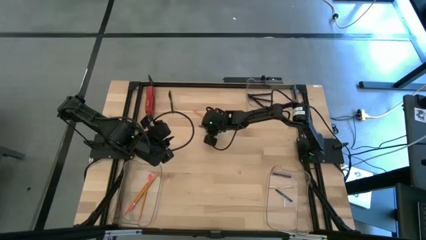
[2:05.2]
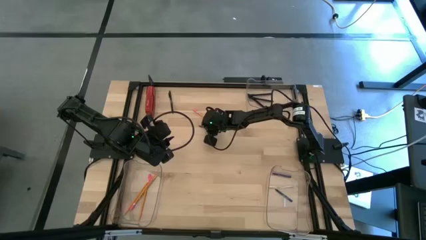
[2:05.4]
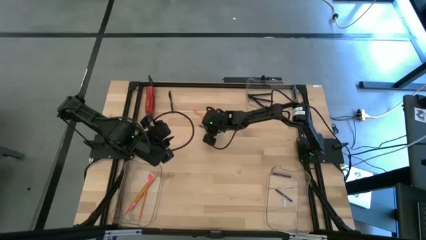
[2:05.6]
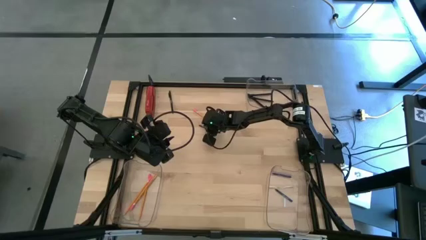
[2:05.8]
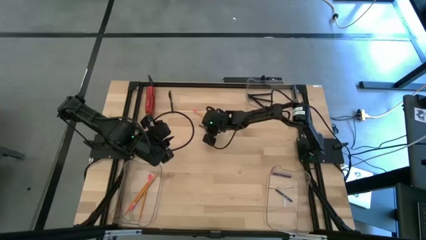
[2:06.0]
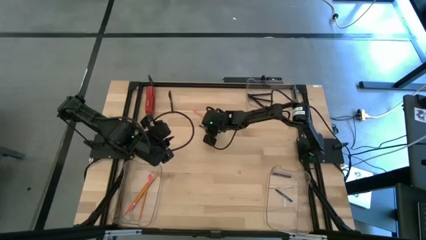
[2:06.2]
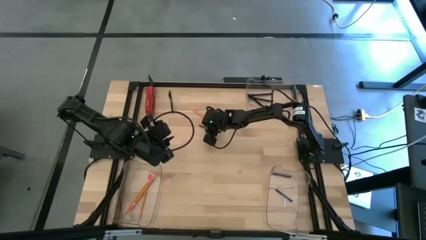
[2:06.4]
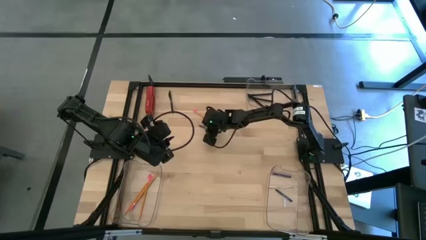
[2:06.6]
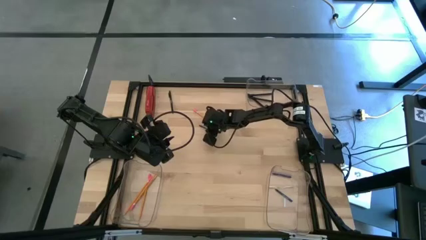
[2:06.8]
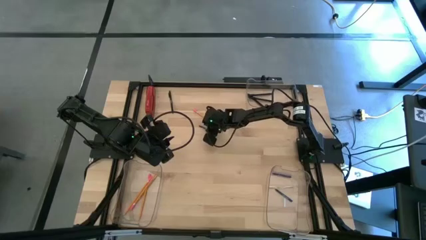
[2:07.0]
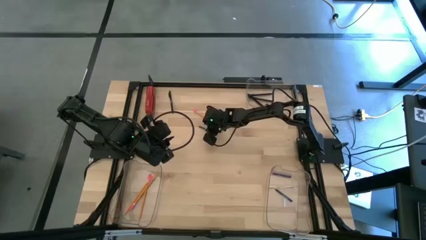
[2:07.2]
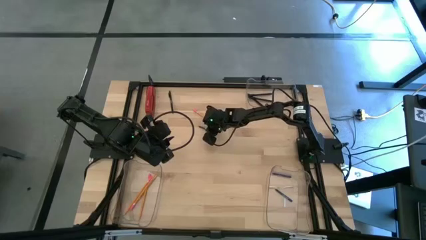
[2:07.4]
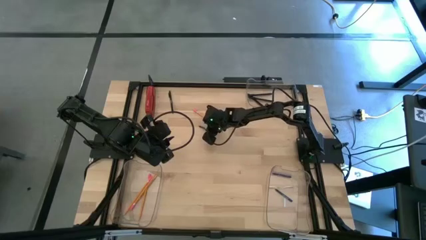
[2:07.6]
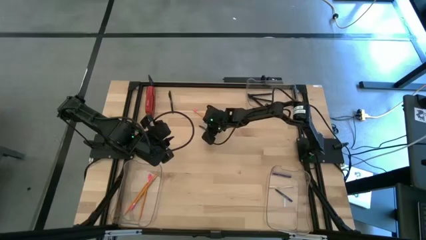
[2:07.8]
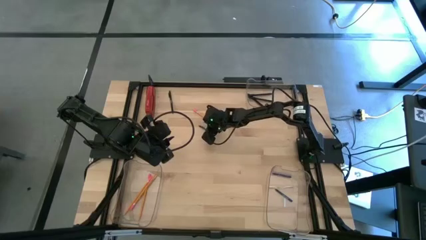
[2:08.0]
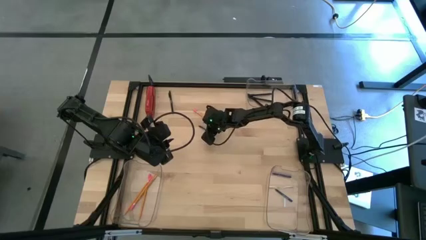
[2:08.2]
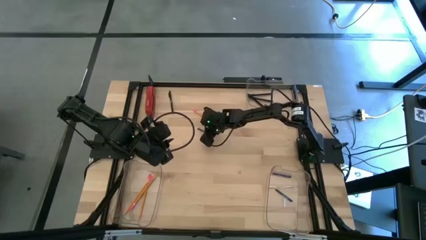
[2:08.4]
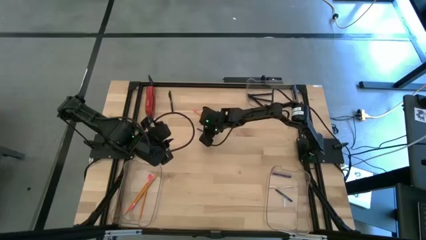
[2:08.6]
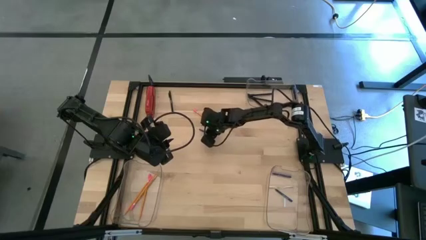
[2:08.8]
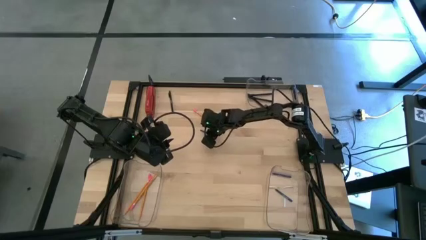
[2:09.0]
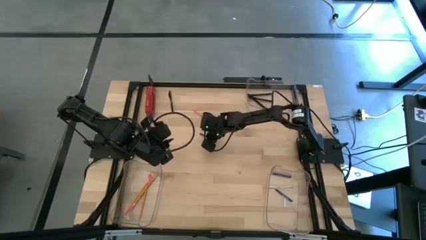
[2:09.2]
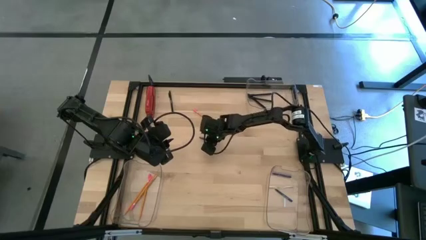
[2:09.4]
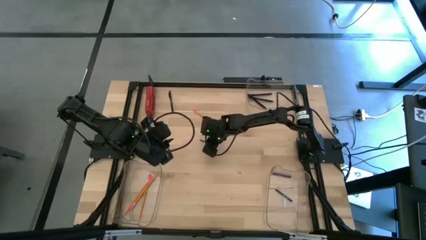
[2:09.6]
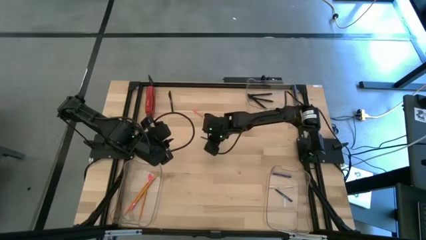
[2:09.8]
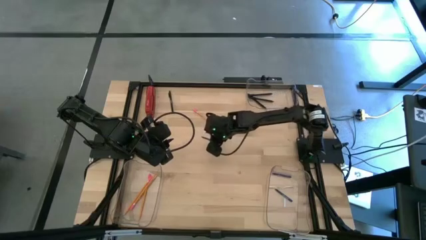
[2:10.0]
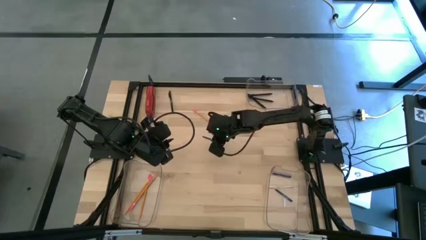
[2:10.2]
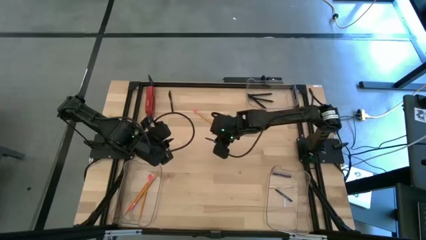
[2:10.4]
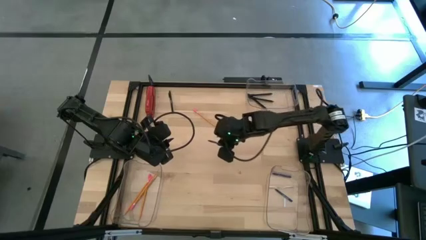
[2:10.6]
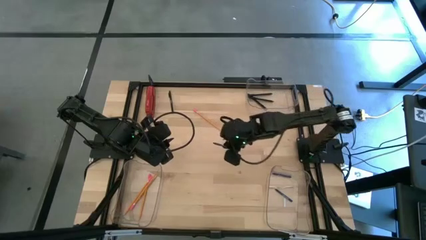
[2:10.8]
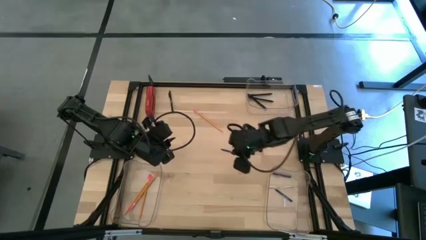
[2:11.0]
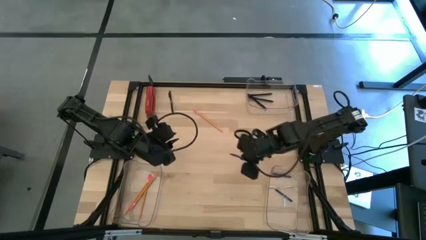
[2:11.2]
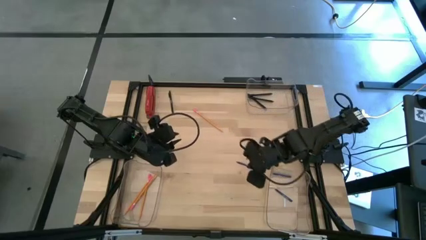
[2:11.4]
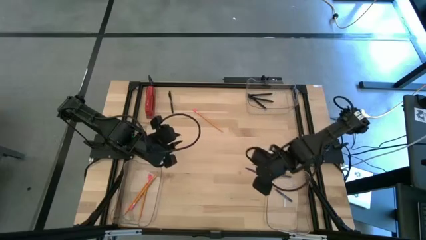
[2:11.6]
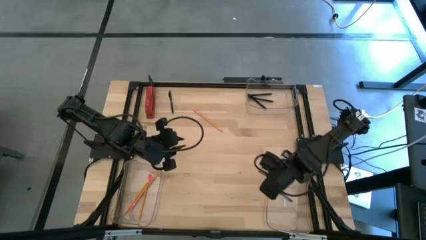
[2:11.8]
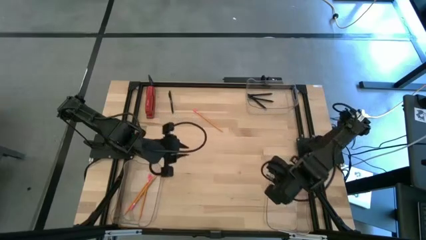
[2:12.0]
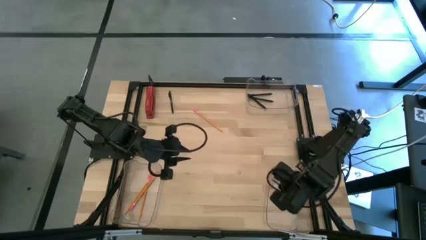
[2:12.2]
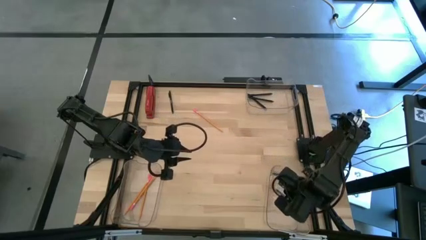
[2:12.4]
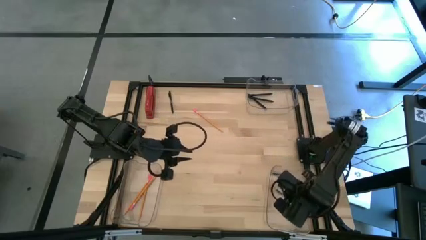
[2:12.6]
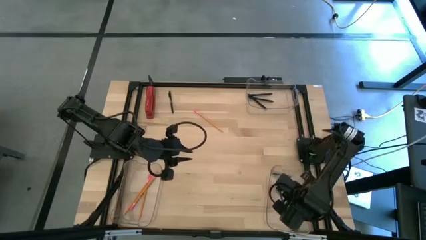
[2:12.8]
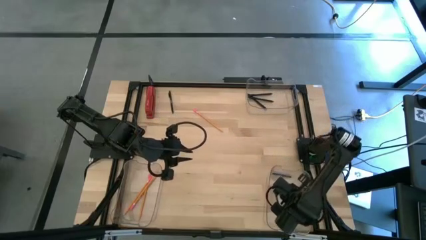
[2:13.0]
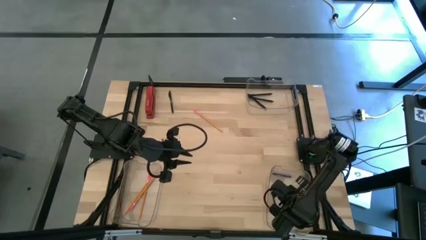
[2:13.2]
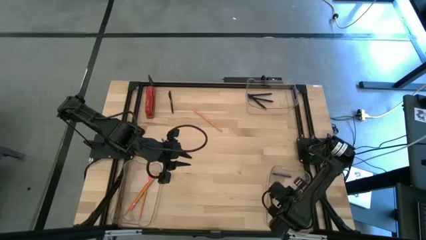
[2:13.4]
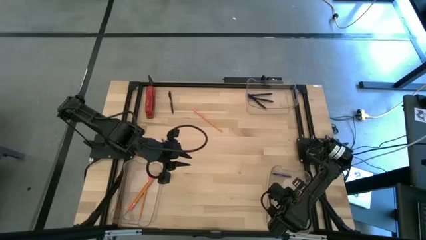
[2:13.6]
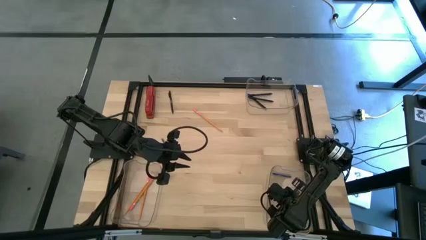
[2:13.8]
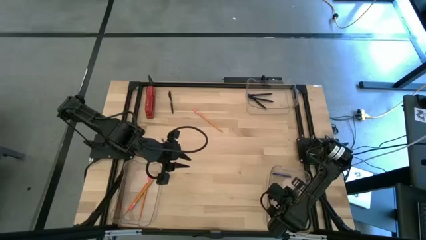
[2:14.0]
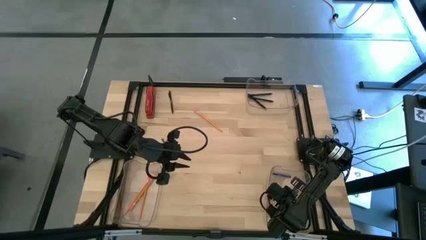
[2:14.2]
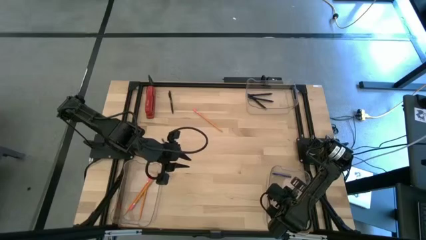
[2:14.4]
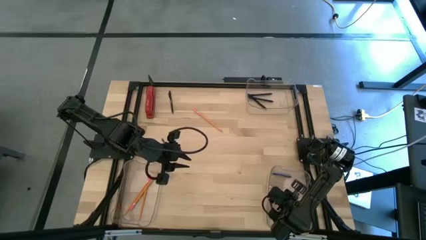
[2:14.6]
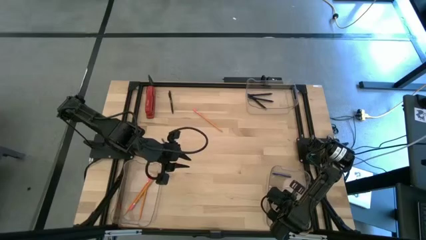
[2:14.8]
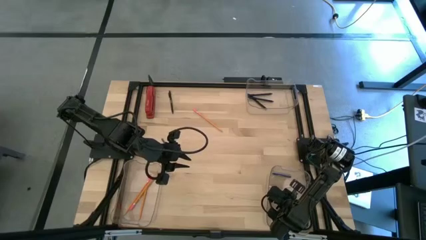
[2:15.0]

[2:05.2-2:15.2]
Task: Sort crayons/erasers/pens/pencils in bins
Put the blue crayon into the bottom right transparent bin

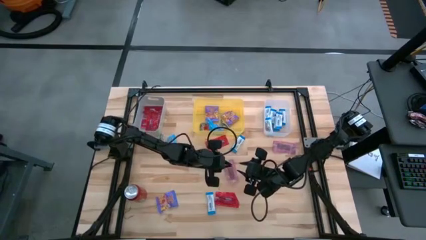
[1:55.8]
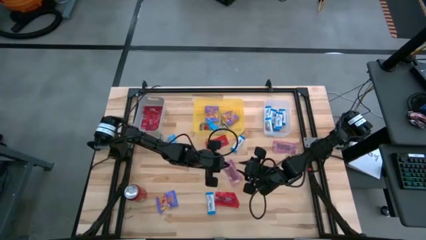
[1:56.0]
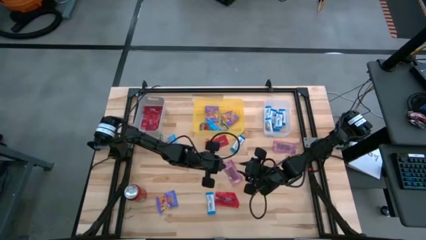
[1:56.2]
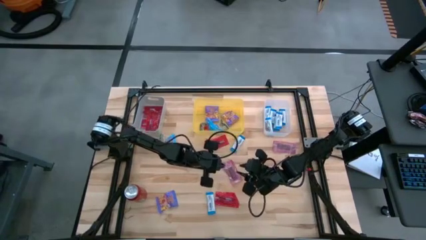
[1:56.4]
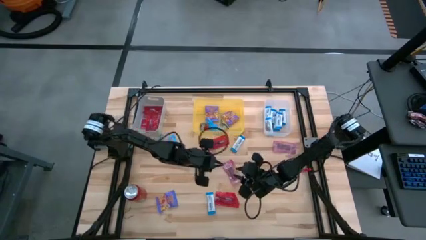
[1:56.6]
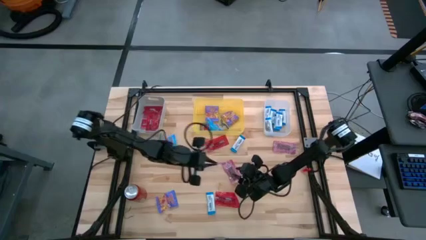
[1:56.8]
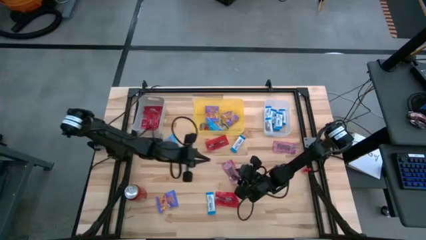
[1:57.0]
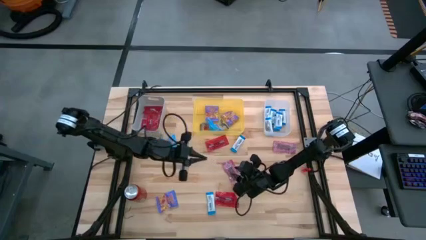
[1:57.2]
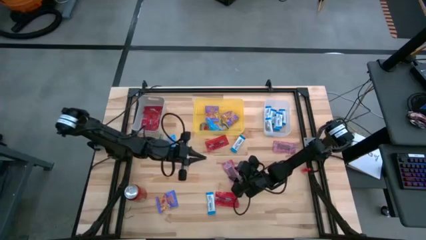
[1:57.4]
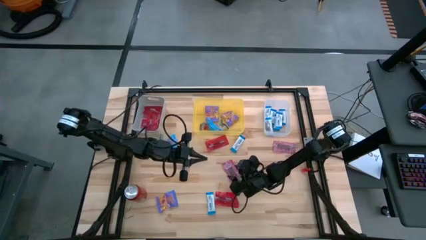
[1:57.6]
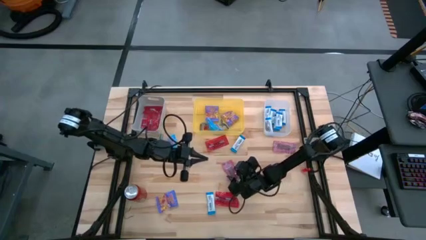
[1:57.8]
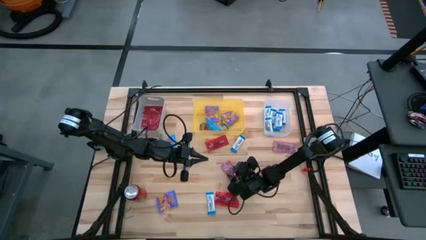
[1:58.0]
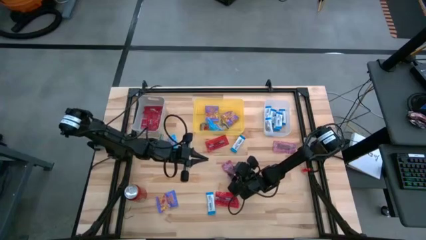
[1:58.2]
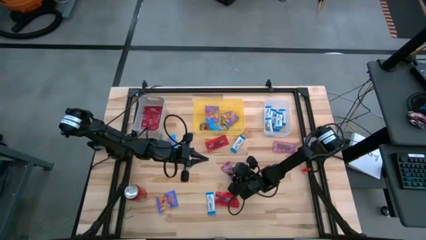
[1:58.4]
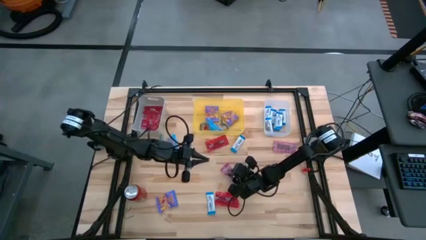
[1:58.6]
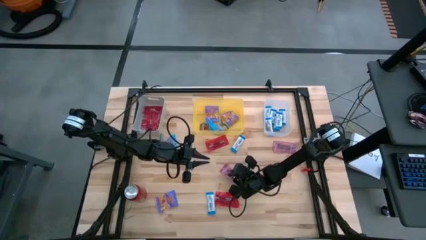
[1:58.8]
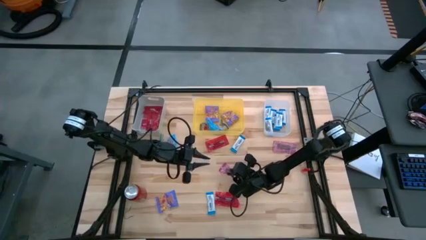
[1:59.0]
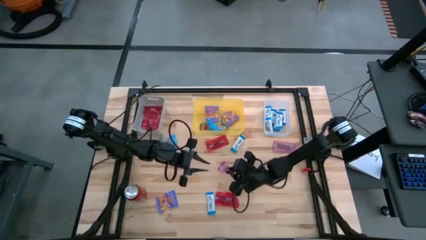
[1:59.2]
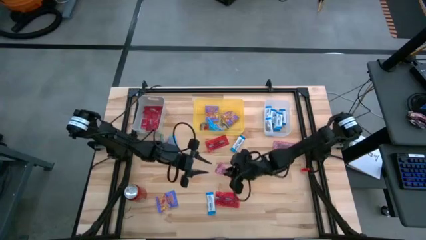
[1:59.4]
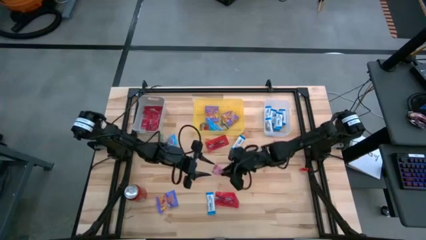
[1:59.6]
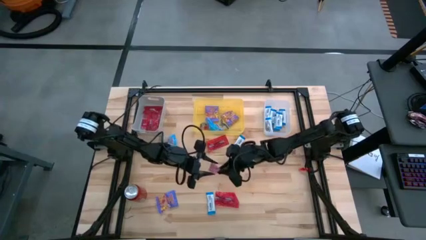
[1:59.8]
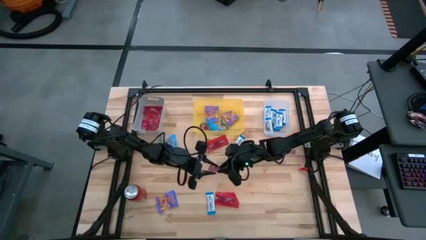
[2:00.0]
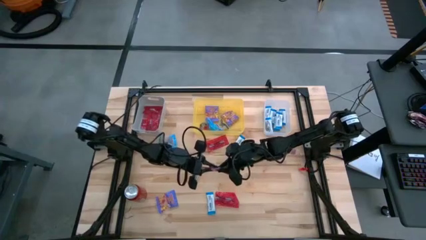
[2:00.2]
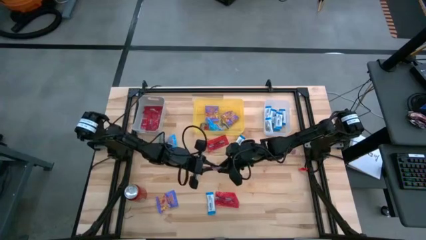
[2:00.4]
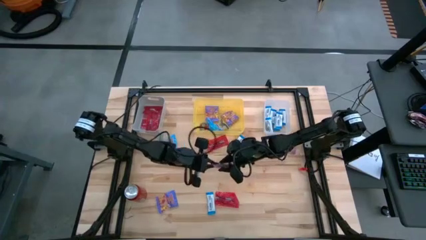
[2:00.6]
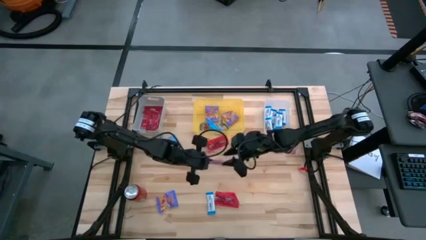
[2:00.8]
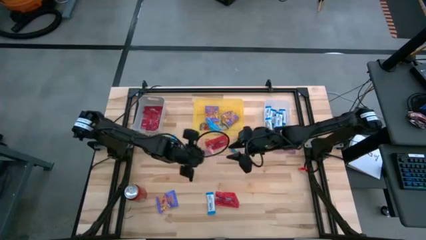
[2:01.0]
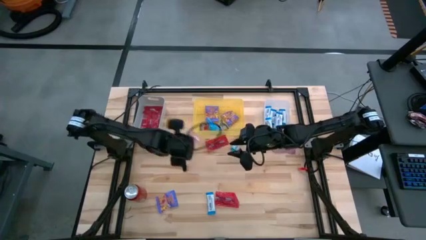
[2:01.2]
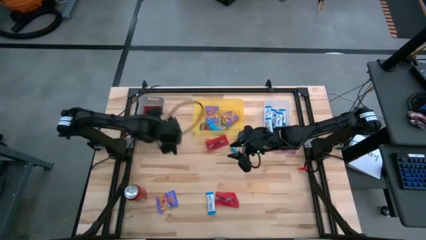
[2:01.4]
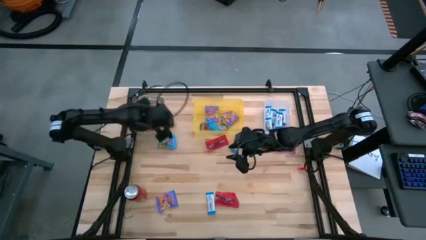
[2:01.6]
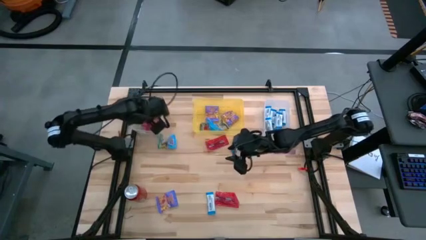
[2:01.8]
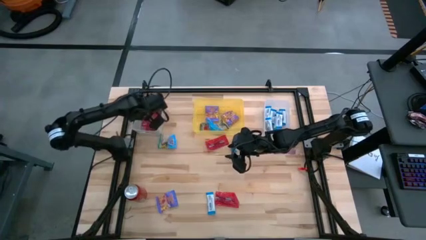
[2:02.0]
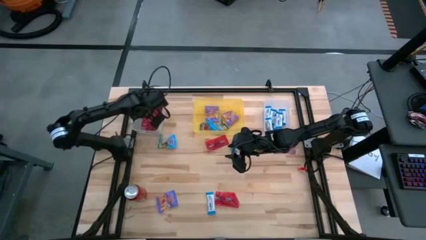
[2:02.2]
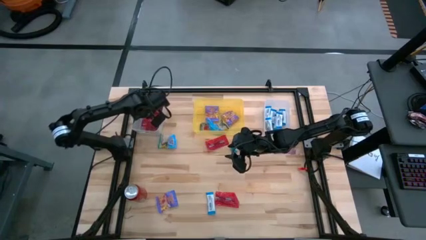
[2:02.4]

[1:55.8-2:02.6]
Task: Sort candy
Put the red gummy into the gray bin
